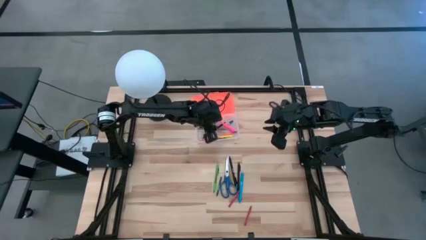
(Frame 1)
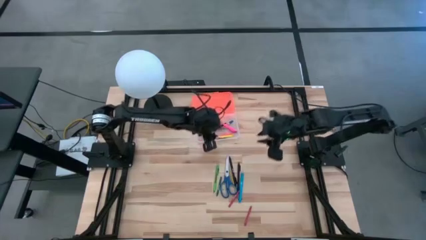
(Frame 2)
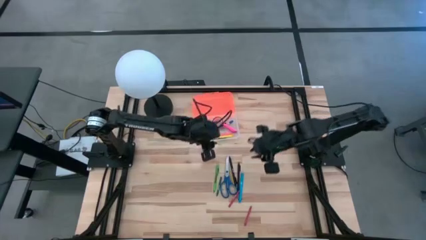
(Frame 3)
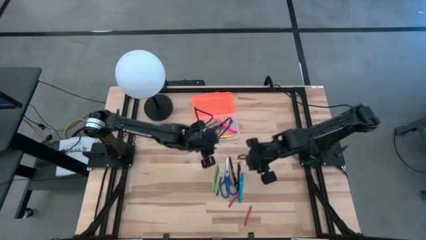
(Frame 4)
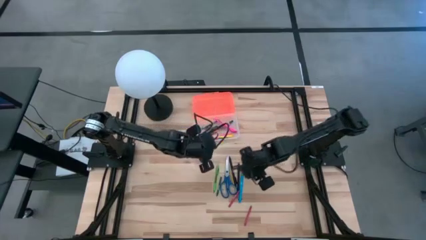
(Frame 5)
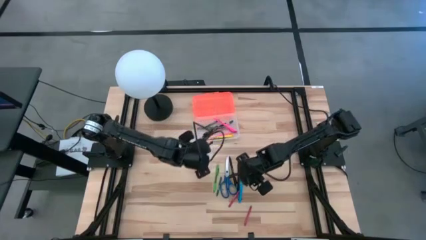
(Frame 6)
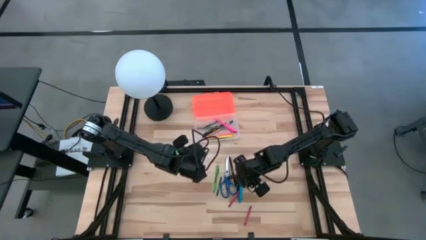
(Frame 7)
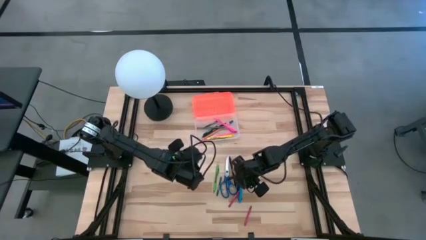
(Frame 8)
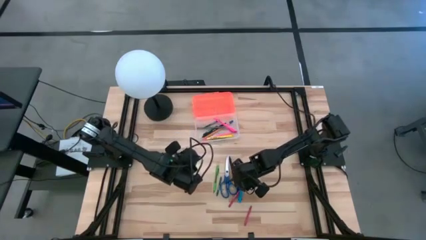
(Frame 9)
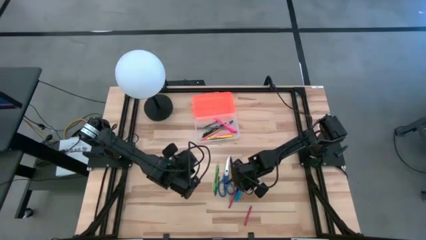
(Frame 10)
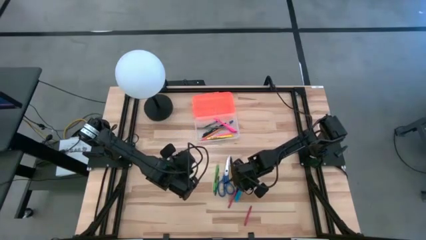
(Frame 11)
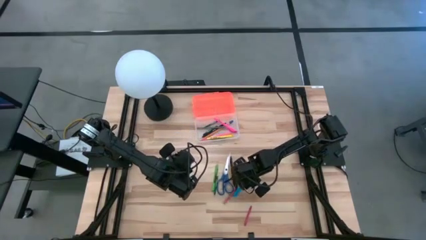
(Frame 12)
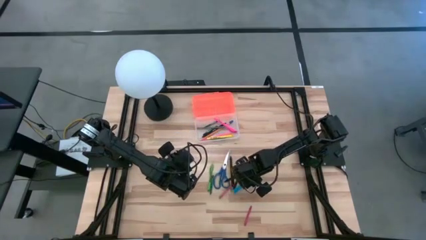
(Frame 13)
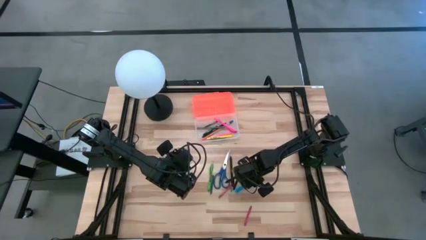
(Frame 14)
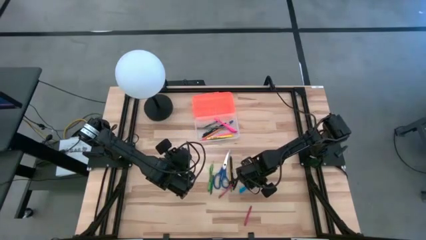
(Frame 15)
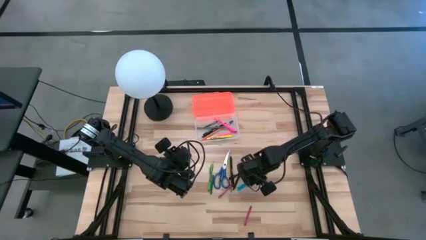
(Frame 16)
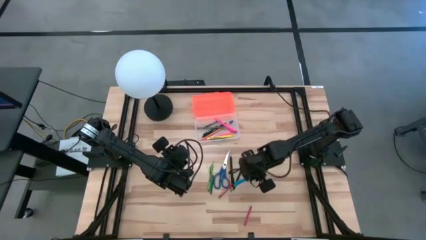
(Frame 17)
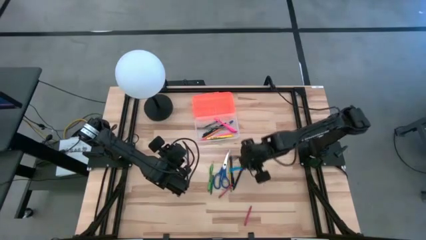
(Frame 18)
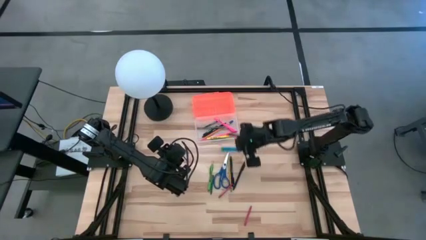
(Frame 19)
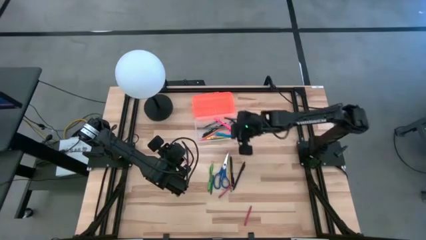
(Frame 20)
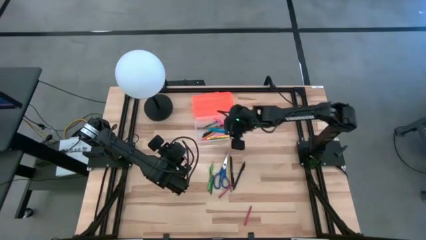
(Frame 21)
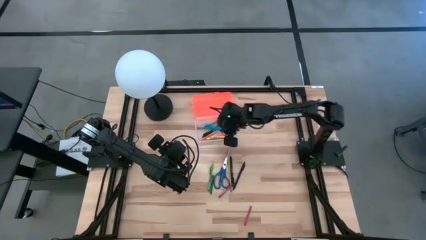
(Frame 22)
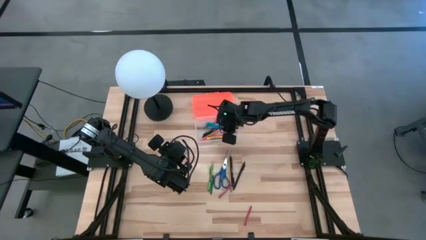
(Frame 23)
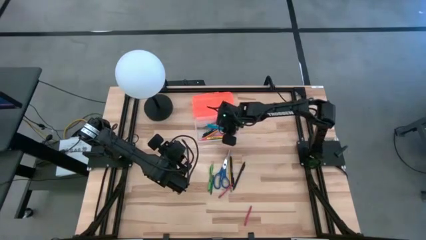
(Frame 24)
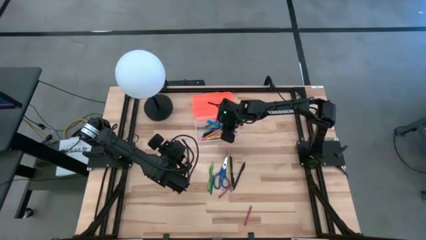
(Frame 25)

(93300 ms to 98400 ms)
Task: Pick & place school supplies into a supply box
Put the blue pen into the supply box

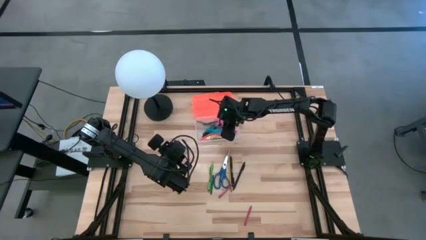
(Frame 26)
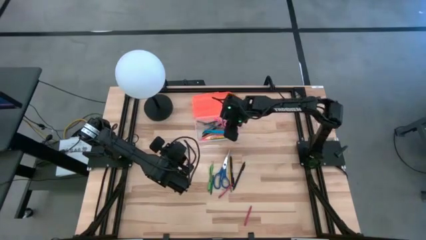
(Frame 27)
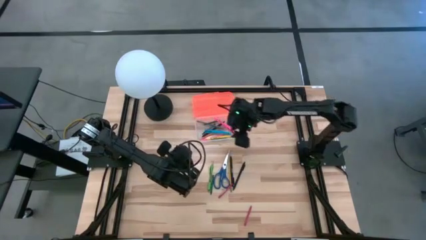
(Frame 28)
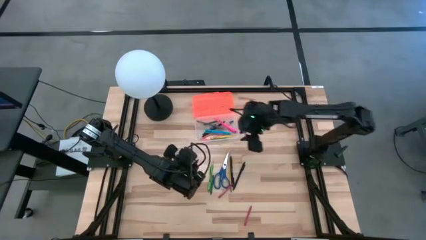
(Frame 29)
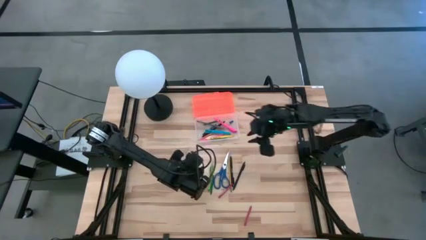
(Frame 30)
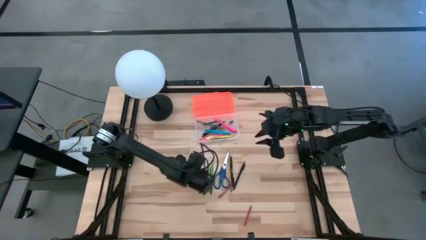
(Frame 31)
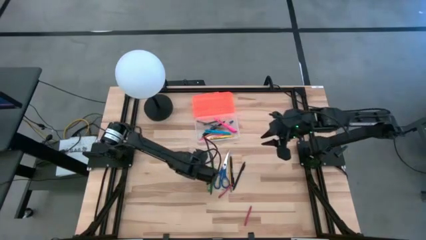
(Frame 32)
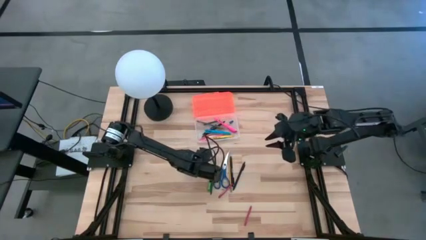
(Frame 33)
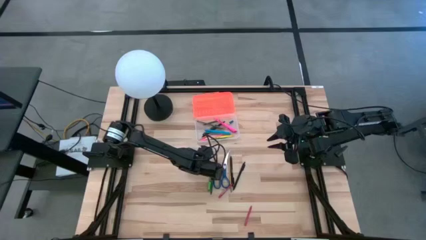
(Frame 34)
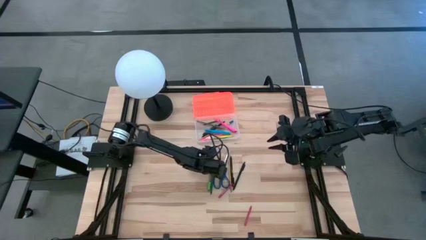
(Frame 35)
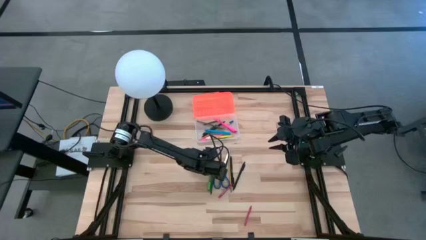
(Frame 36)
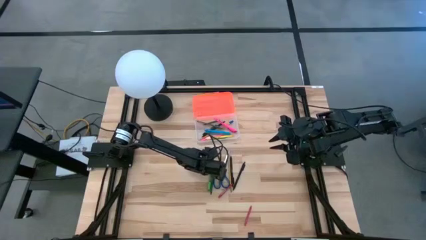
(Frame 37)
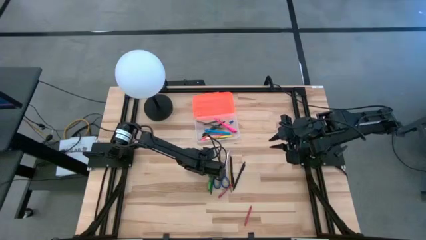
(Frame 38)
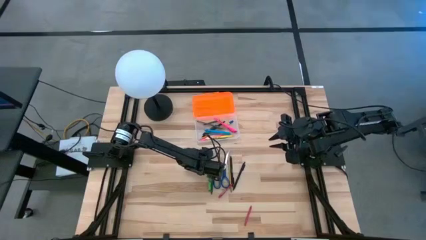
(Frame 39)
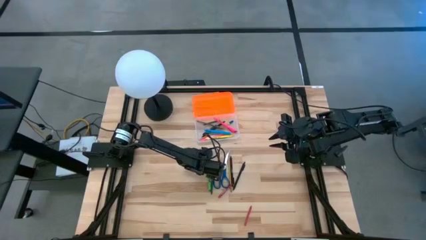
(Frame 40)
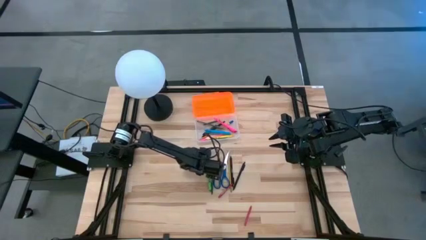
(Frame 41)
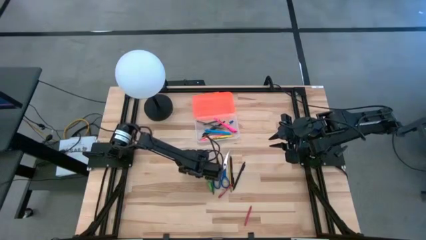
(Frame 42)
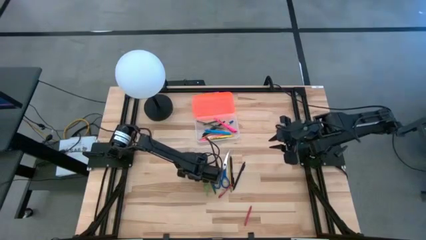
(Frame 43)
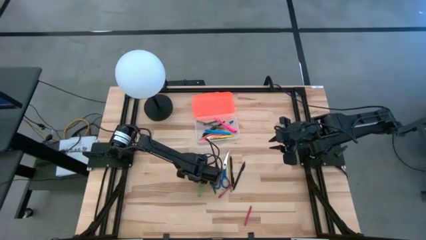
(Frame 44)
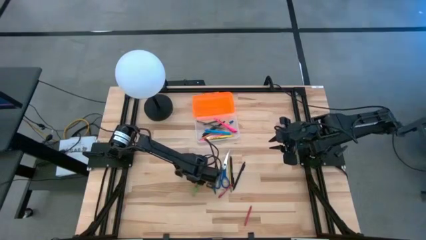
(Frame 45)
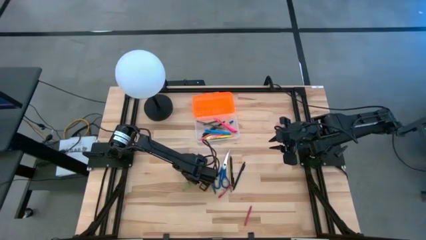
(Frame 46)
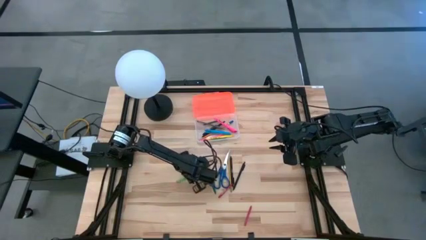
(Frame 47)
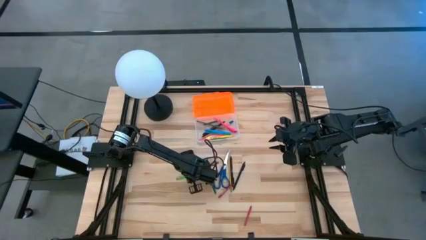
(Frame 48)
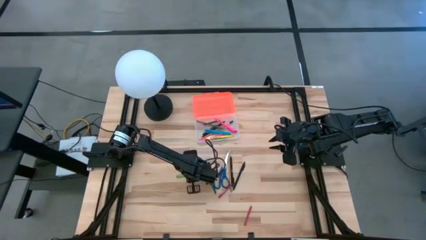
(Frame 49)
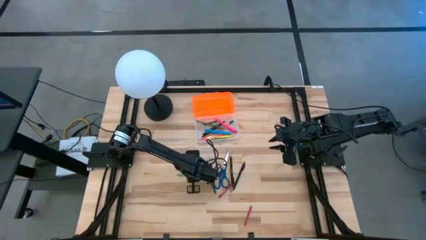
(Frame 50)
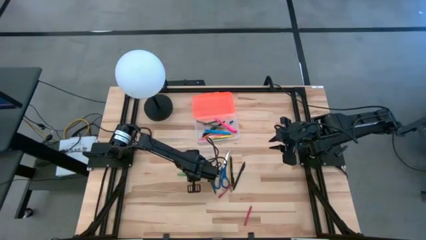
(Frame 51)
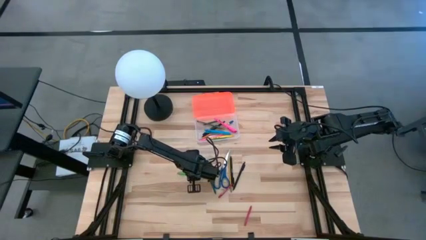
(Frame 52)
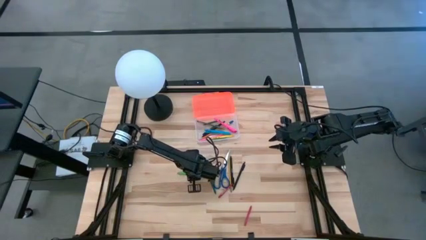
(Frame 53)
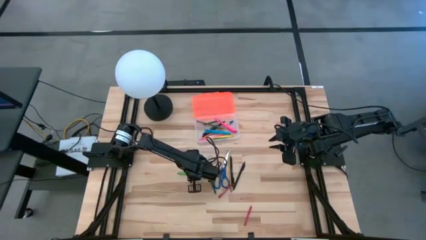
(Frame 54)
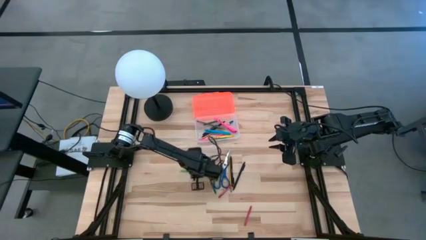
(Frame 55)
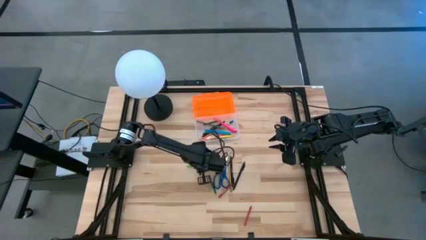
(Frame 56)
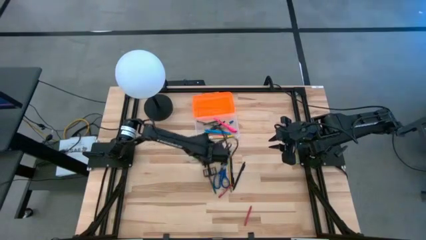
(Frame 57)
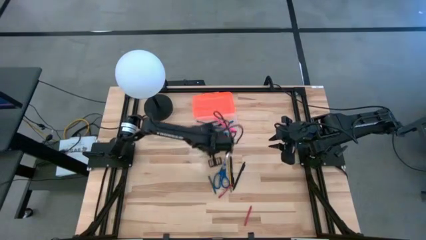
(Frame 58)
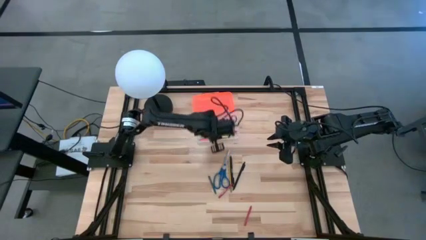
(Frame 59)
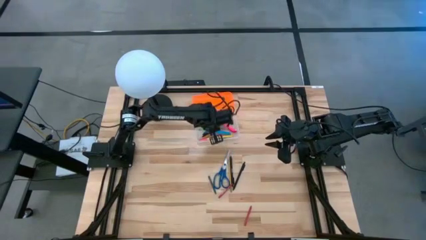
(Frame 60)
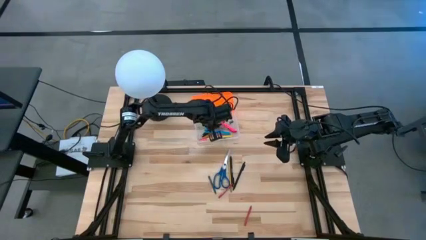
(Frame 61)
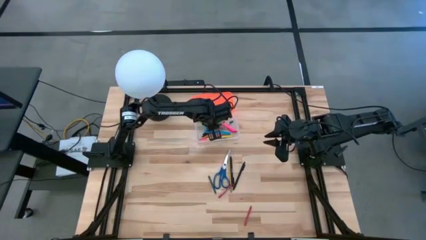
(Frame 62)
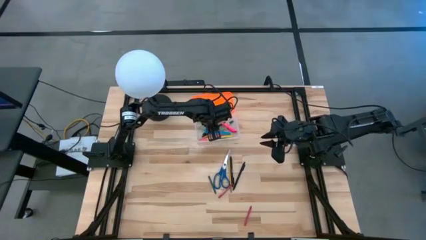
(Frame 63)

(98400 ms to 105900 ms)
Put the green pen into the supply box

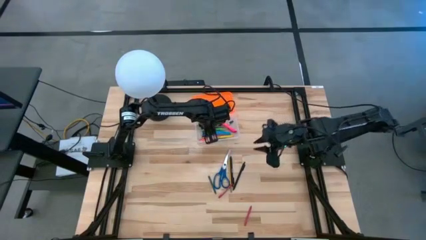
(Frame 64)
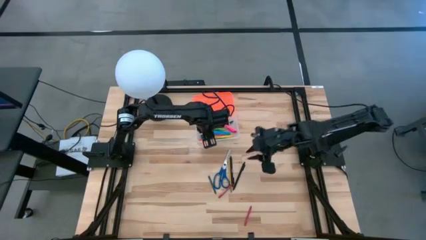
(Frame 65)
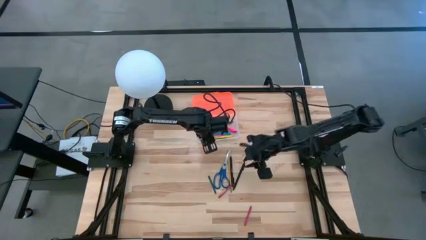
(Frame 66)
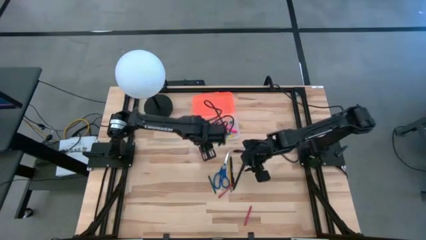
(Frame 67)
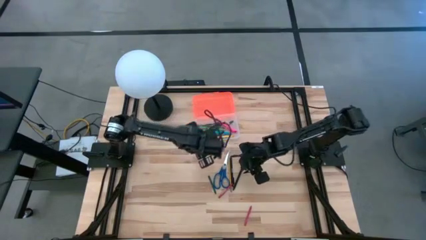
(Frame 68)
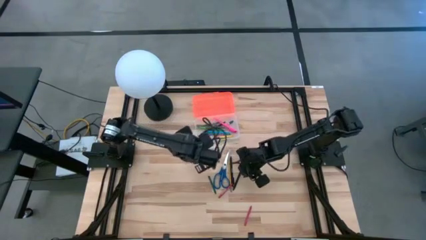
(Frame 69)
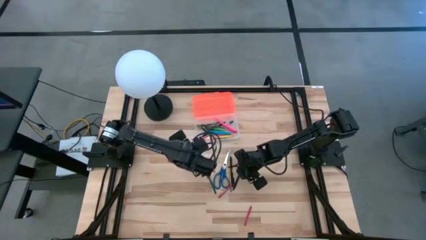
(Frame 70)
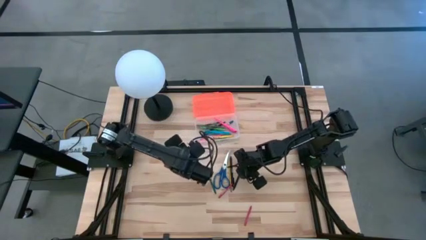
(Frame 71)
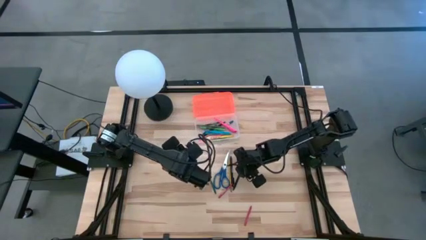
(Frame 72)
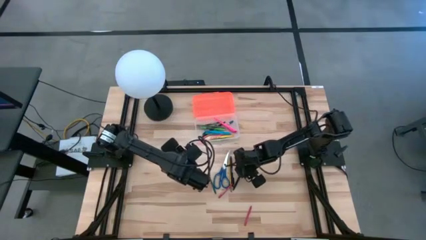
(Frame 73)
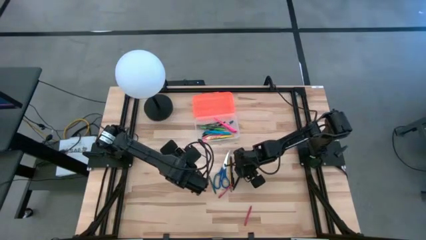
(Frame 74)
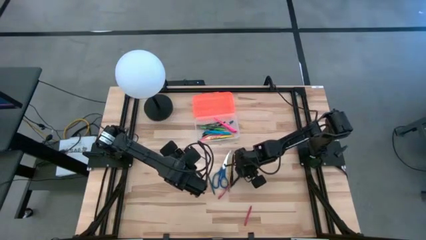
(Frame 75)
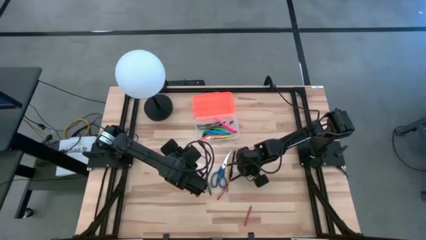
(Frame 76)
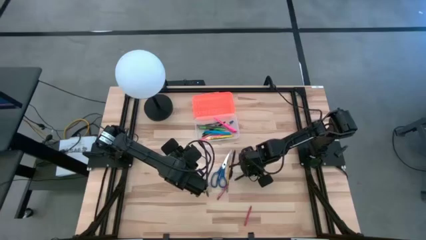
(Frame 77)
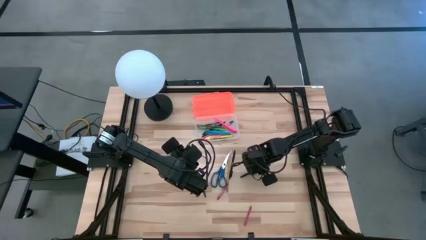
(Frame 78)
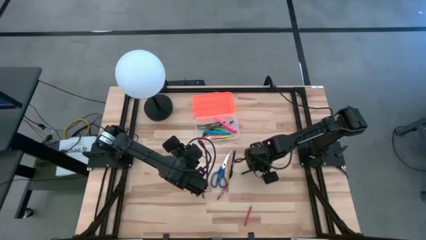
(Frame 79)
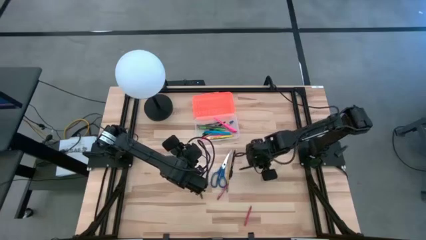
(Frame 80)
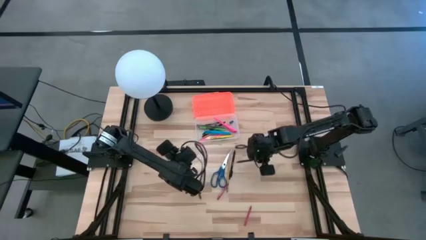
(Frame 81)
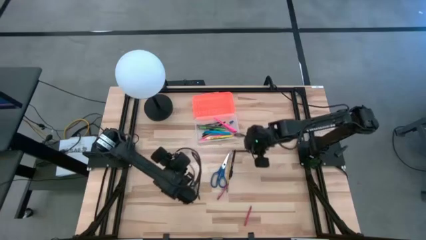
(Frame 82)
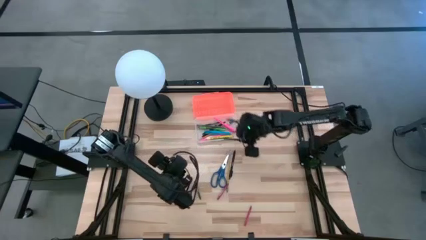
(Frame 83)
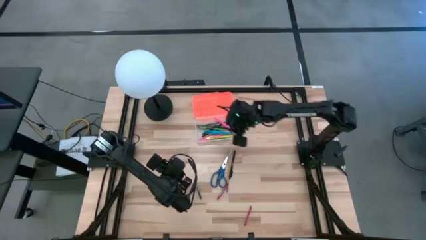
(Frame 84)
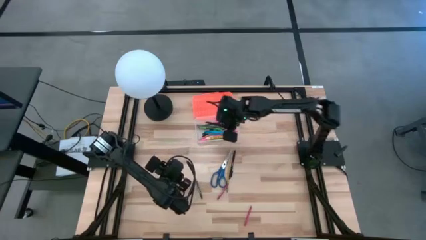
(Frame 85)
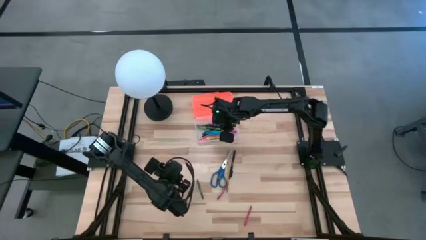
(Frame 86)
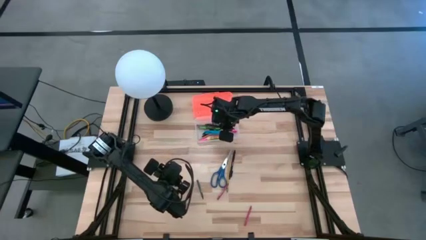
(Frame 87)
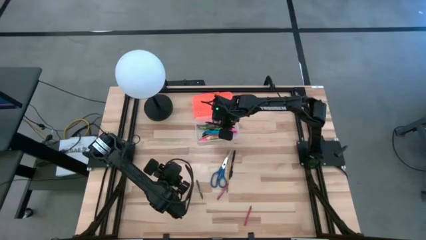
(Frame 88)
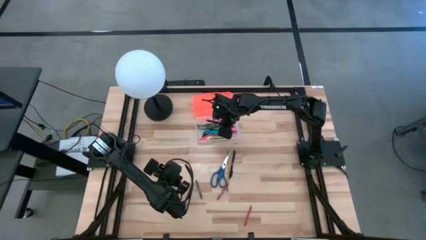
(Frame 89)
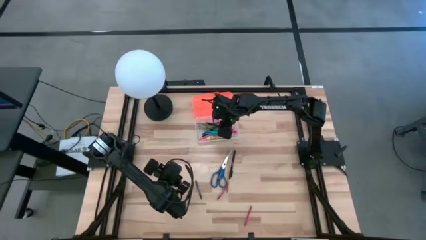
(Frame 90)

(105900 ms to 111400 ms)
Put the right black pen into the supply box
